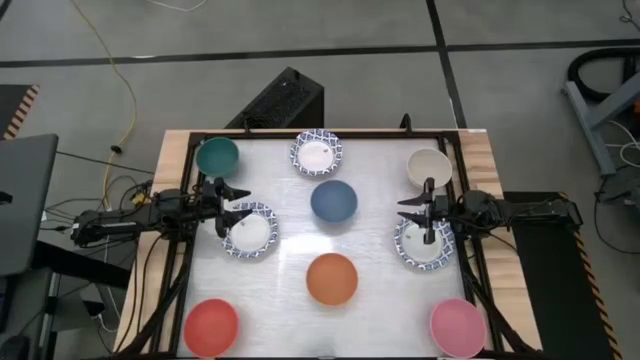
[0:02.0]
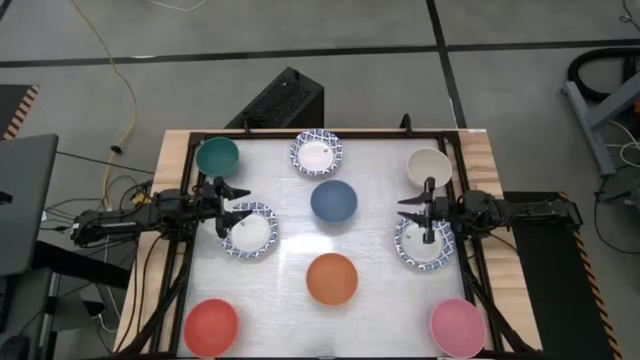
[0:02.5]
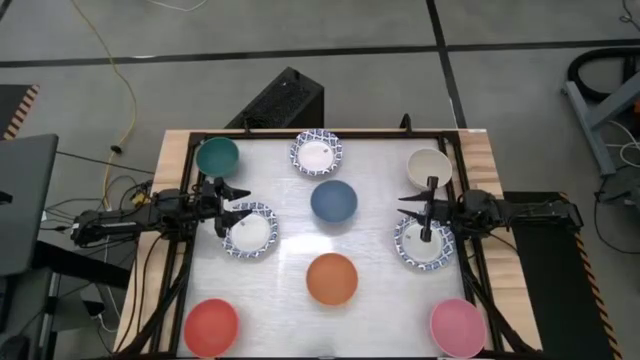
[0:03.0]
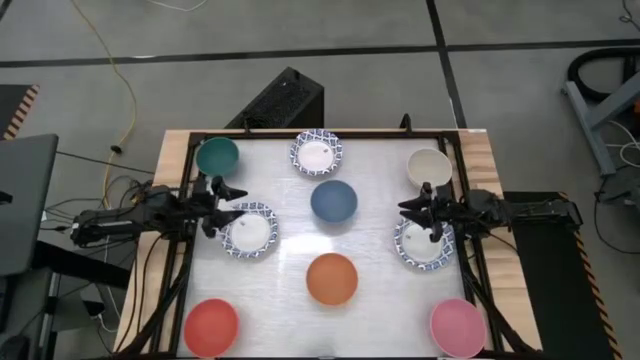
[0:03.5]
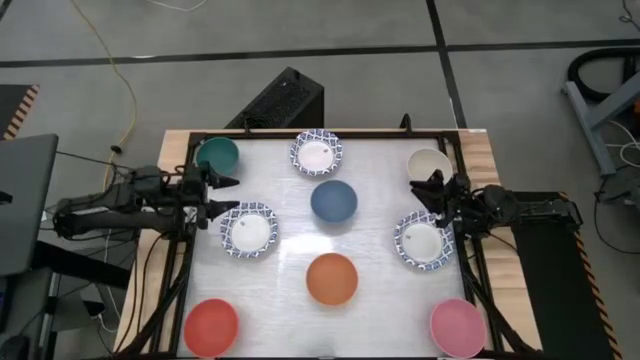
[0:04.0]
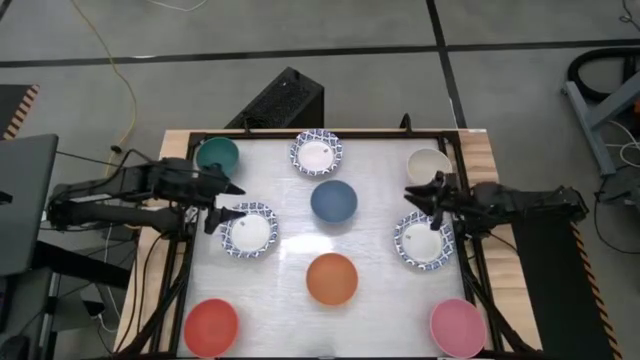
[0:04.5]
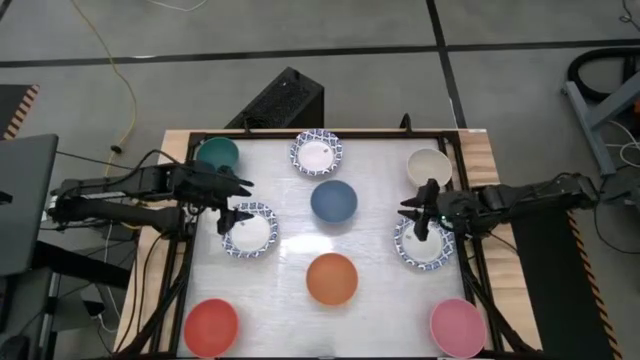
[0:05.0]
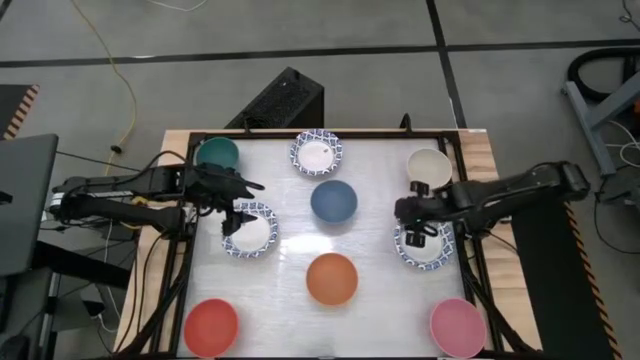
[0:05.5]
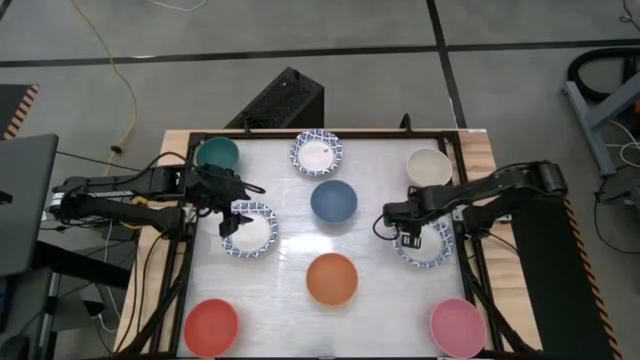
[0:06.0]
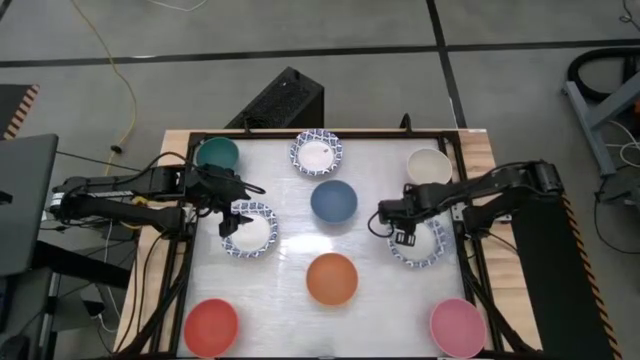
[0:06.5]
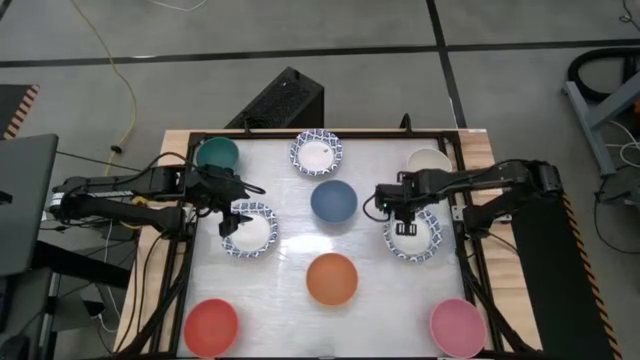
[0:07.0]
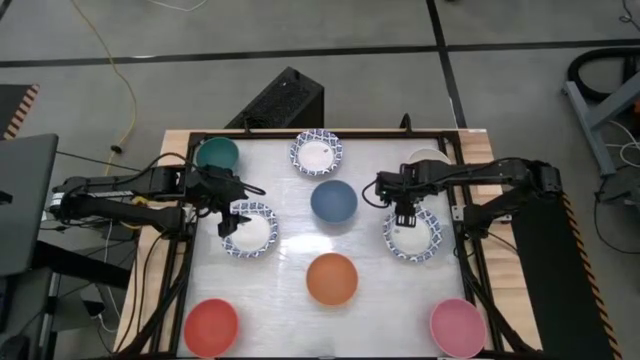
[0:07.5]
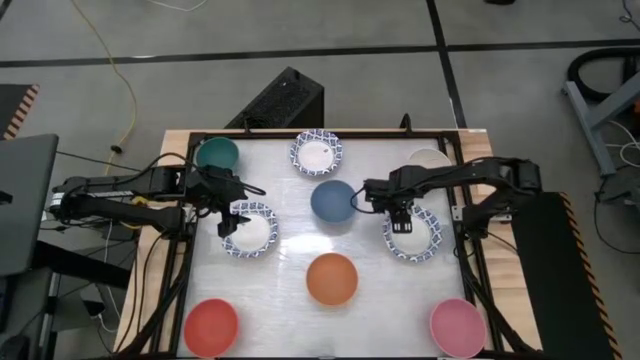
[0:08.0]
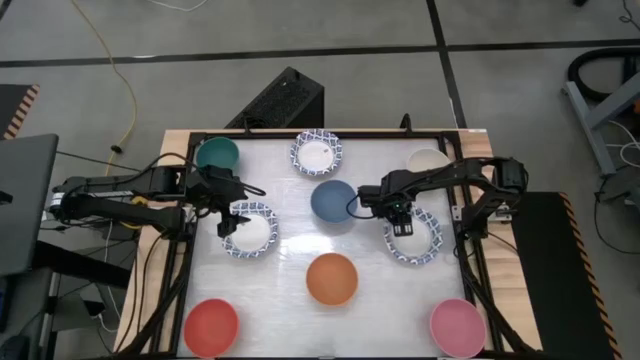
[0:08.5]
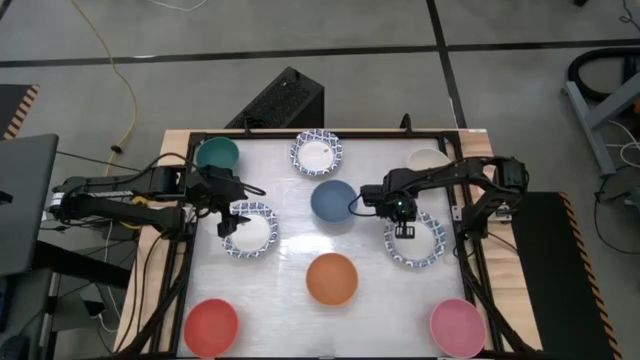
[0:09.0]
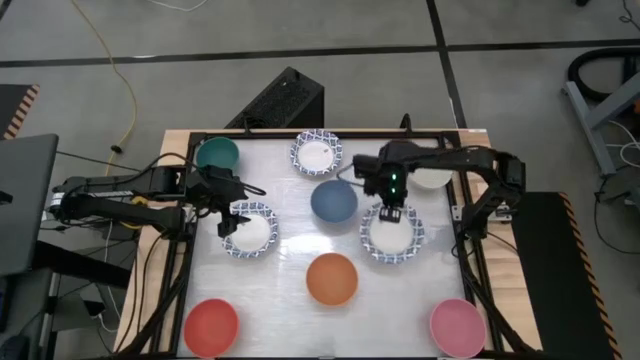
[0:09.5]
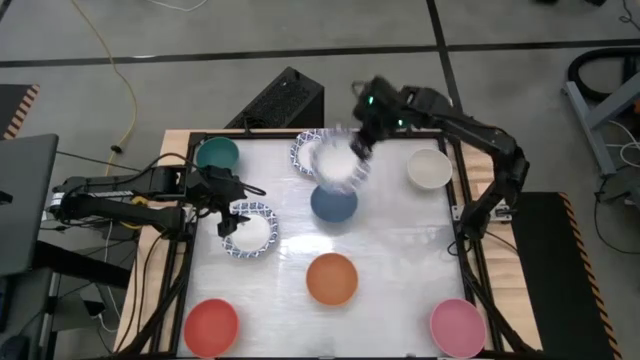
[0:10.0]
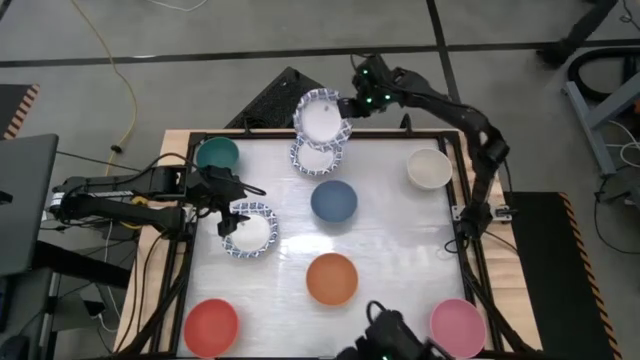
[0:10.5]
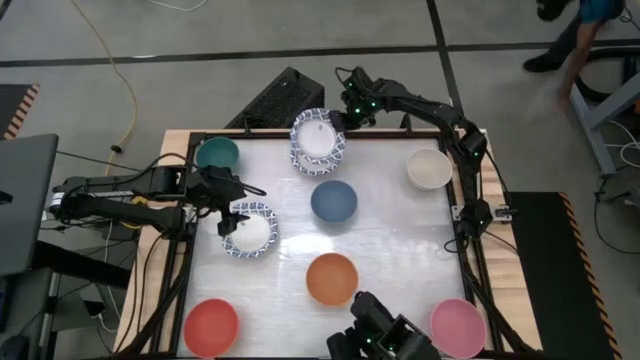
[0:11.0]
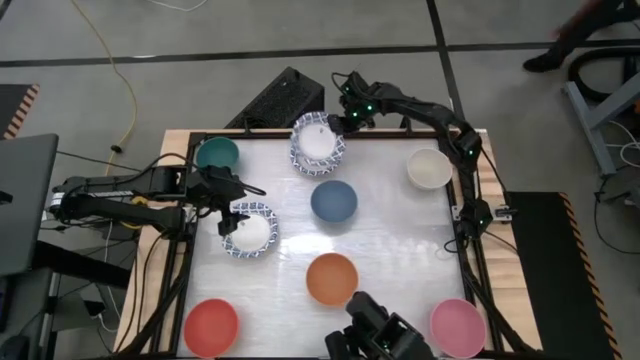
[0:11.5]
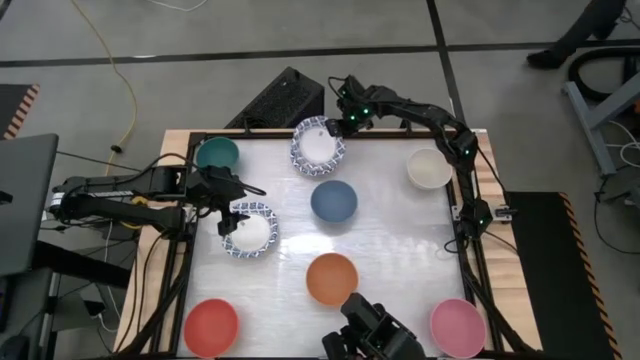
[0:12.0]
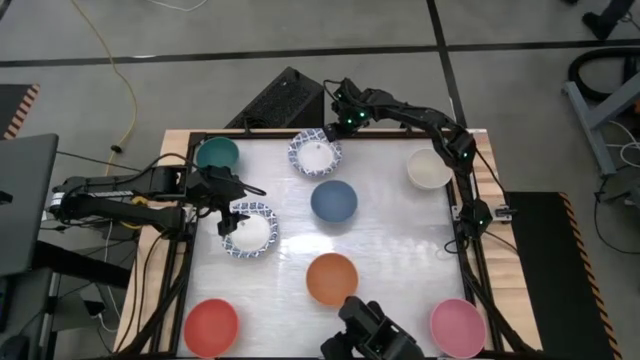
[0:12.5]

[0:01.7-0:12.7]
Stack the right white patterned bowl on top of the other white patterned bowl

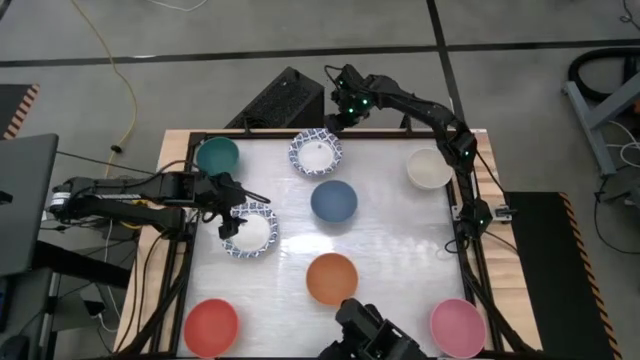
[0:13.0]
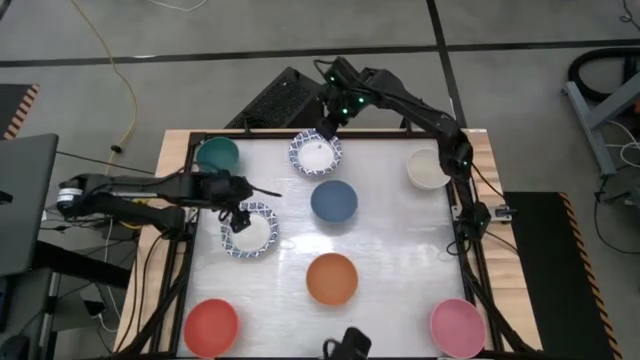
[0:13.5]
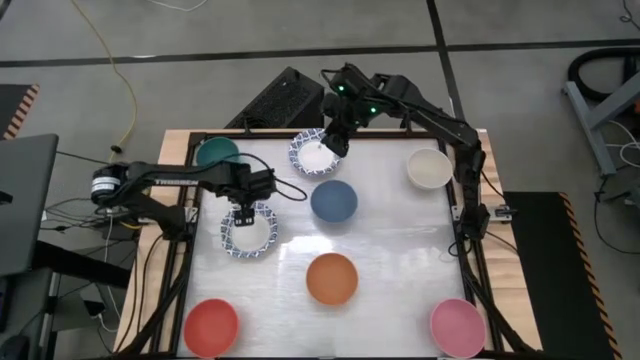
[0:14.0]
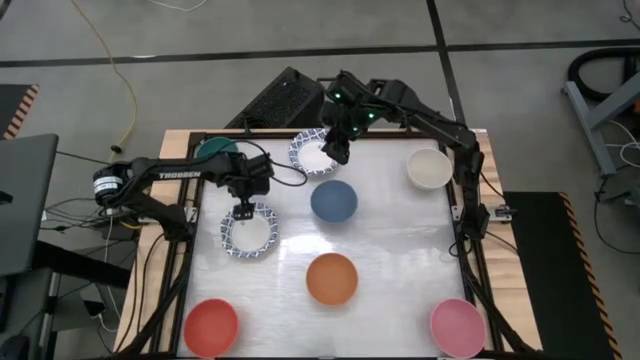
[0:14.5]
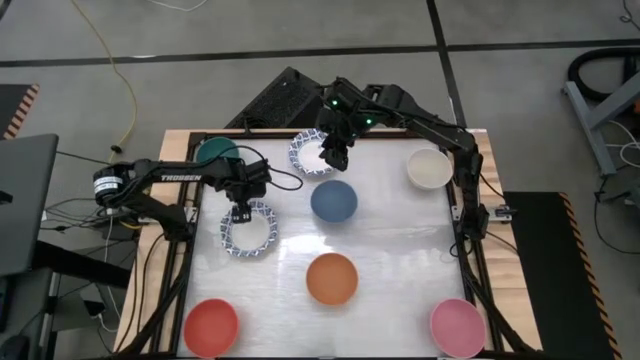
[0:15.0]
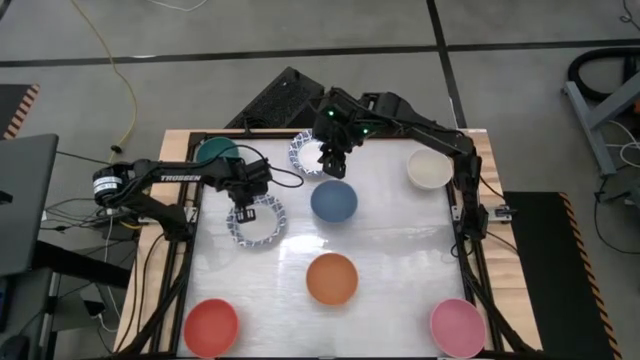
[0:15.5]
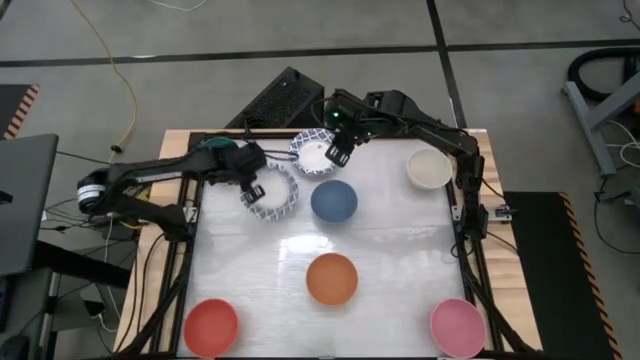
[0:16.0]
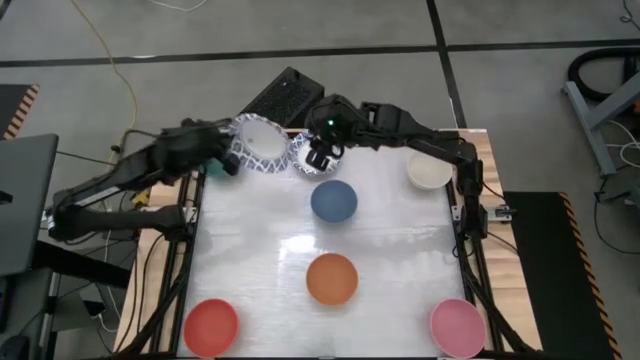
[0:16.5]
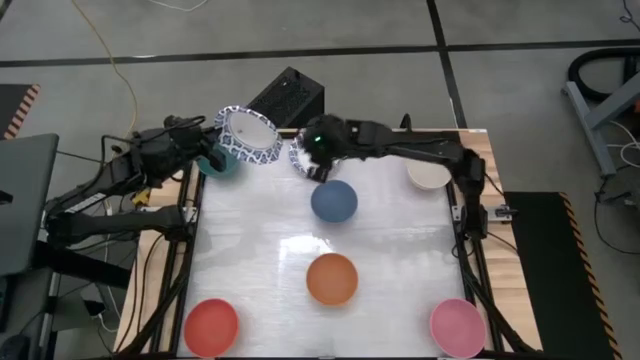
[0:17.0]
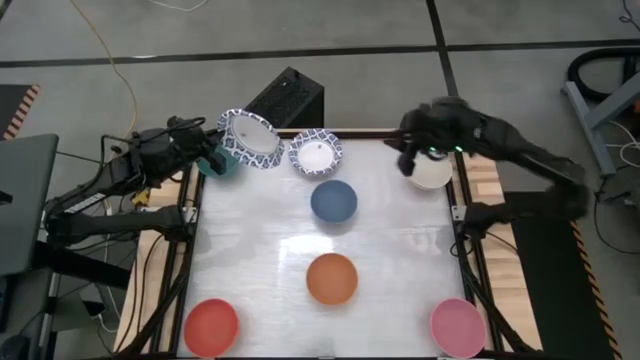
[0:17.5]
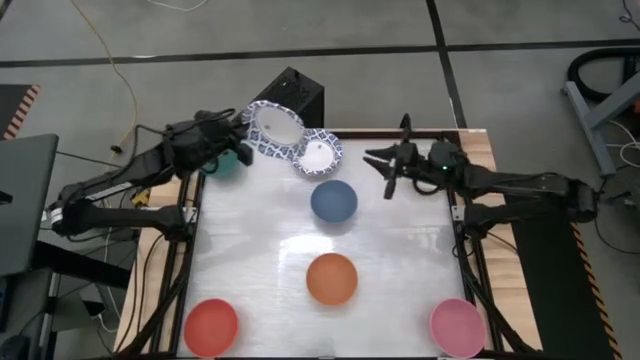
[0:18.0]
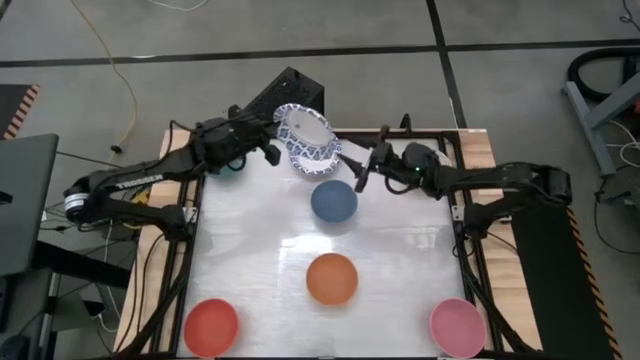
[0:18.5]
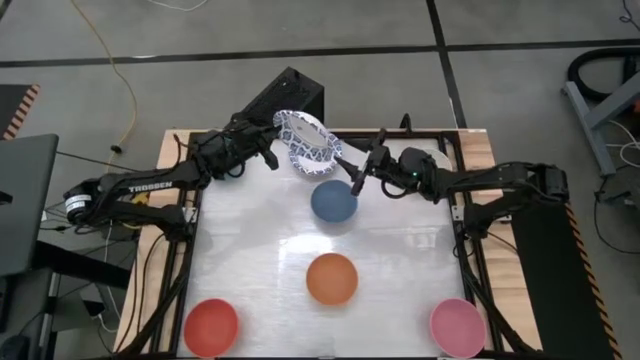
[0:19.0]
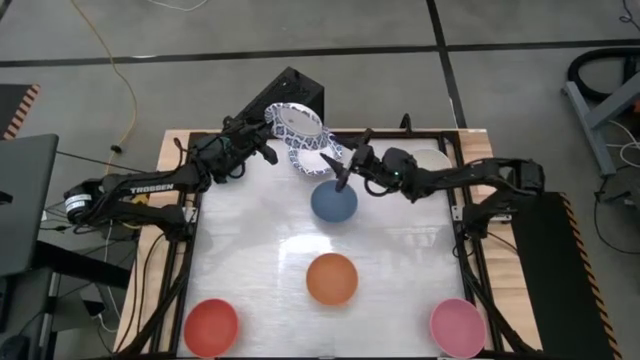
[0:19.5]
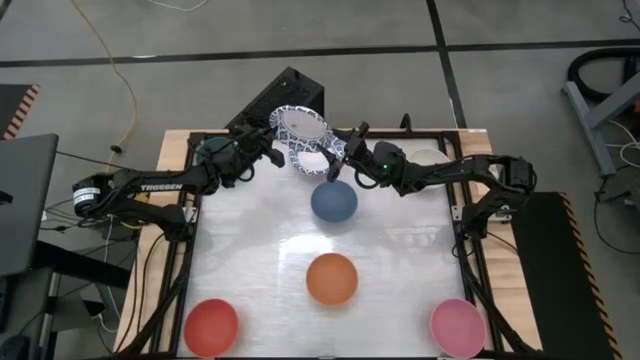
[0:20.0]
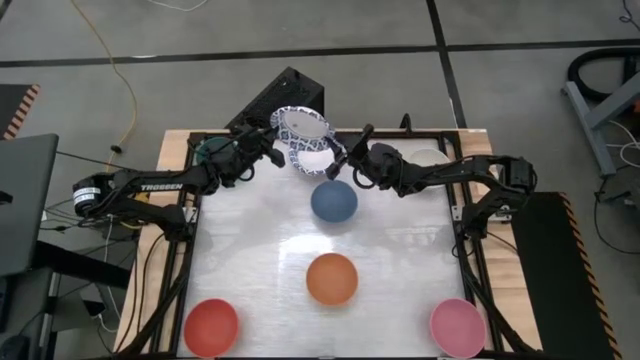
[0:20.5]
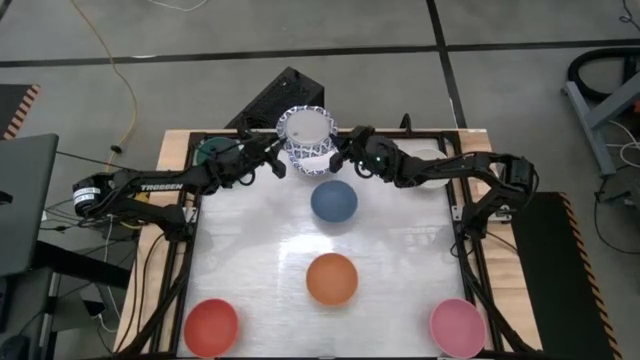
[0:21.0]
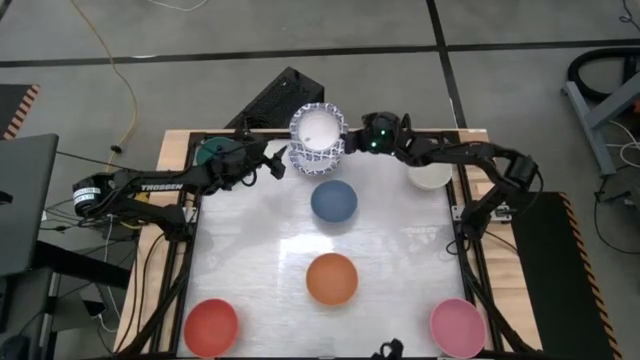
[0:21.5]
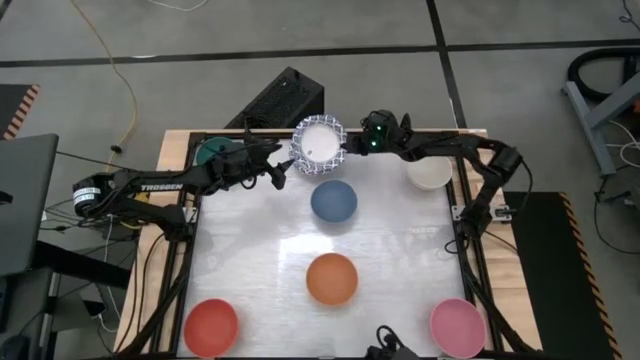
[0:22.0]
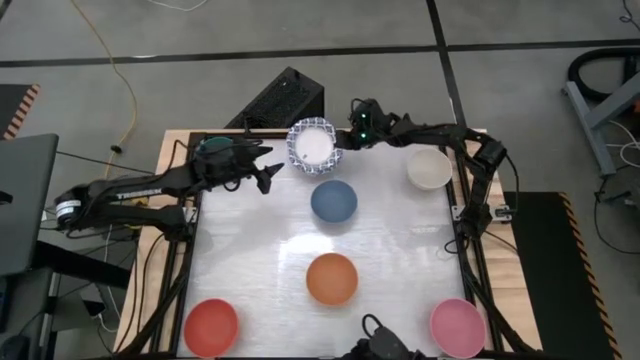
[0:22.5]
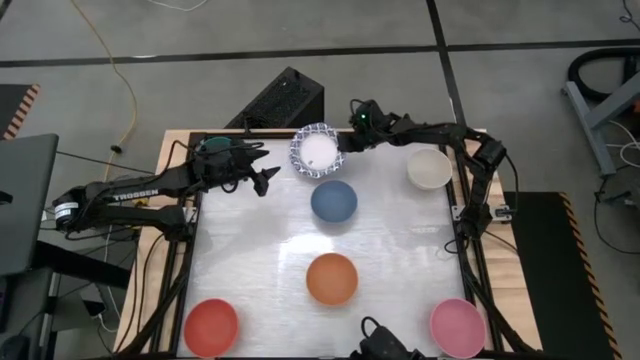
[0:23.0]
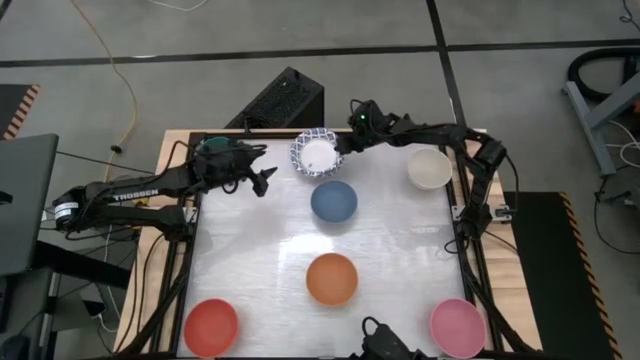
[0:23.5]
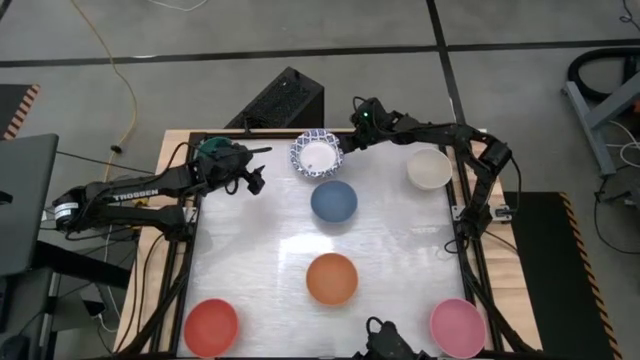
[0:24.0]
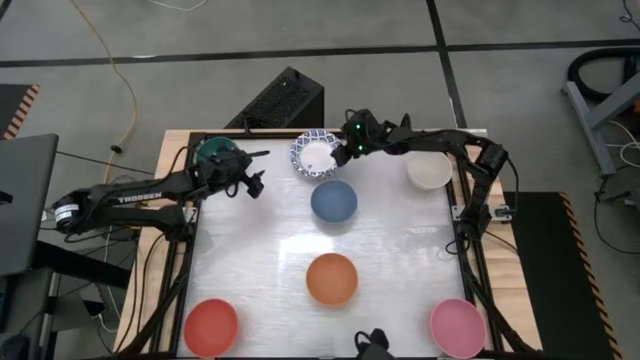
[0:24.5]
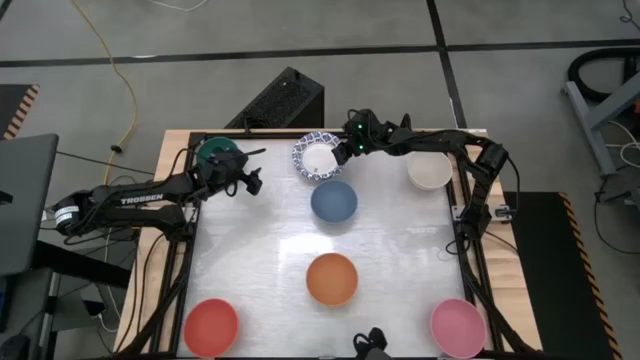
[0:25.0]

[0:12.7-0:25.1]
Stack the bottom white patterned bowl on top of the other top white patterned bowls
